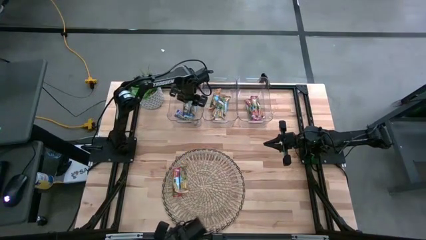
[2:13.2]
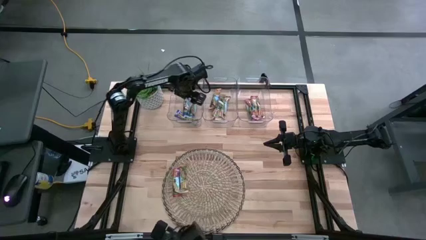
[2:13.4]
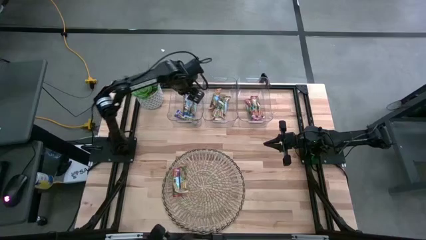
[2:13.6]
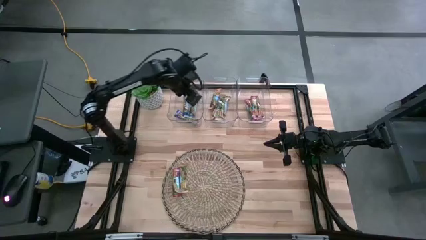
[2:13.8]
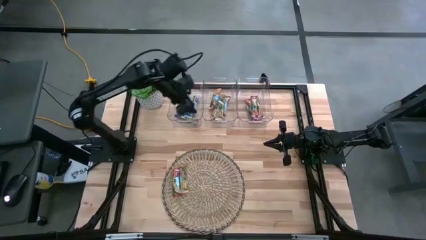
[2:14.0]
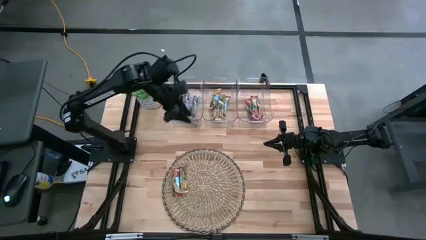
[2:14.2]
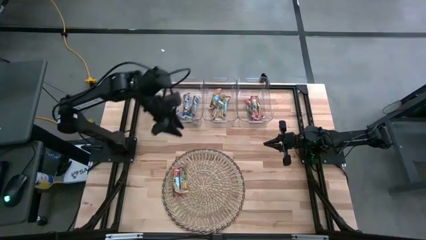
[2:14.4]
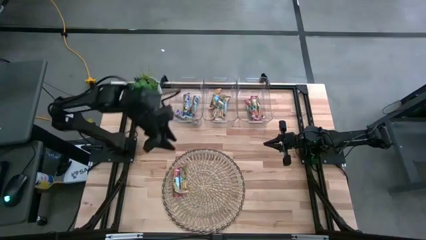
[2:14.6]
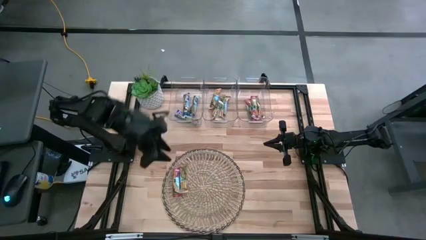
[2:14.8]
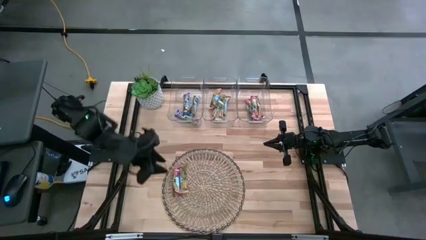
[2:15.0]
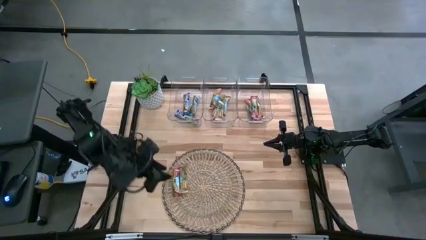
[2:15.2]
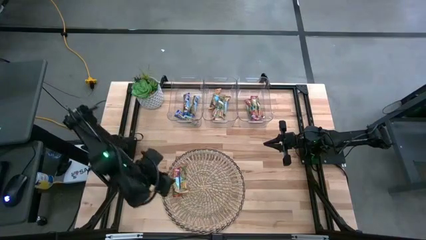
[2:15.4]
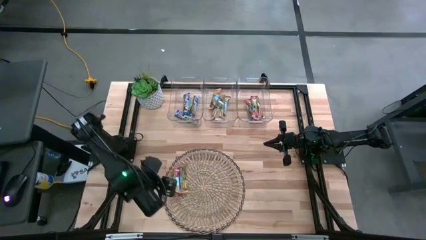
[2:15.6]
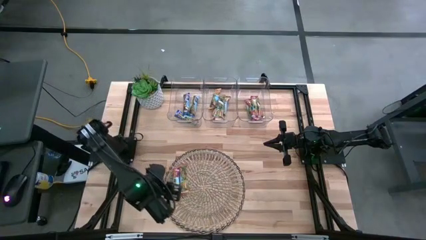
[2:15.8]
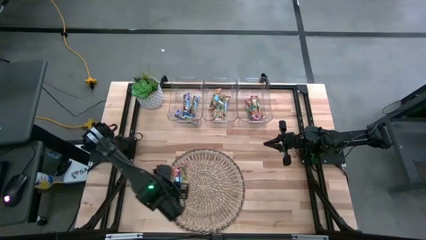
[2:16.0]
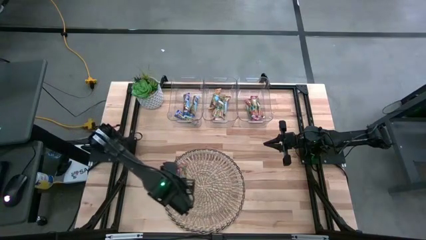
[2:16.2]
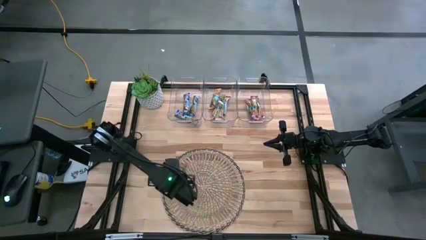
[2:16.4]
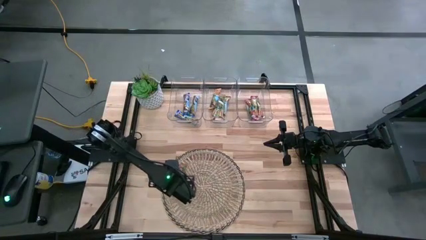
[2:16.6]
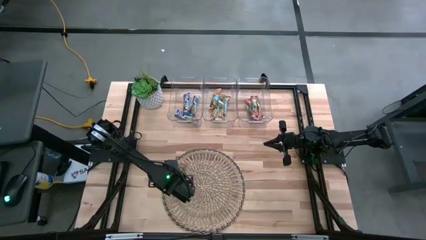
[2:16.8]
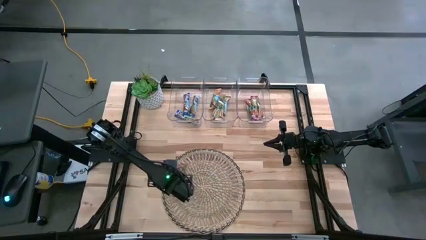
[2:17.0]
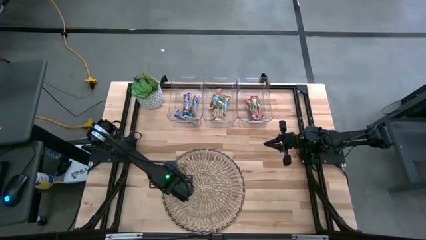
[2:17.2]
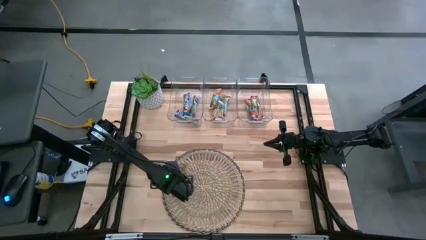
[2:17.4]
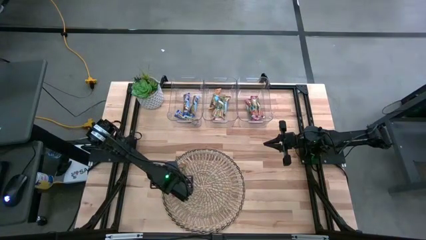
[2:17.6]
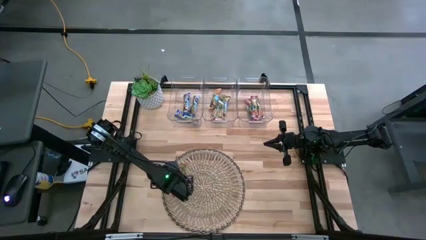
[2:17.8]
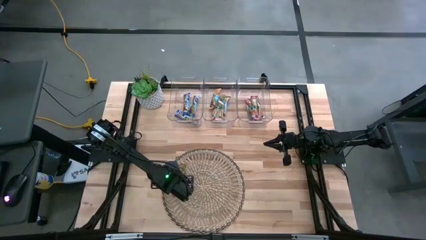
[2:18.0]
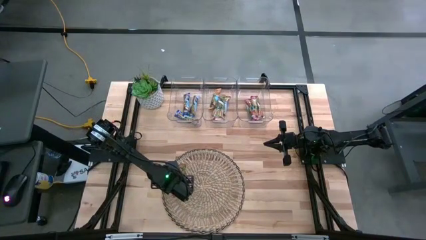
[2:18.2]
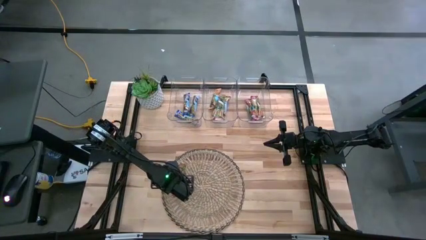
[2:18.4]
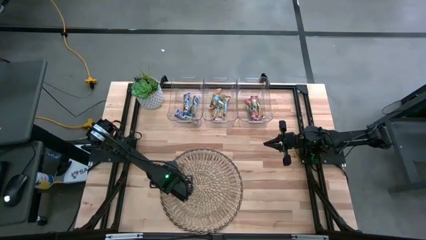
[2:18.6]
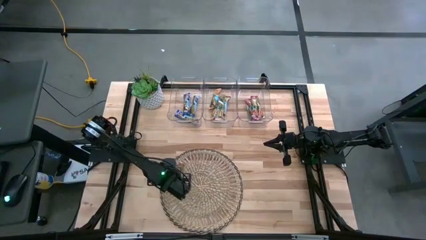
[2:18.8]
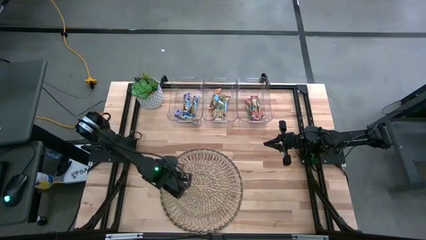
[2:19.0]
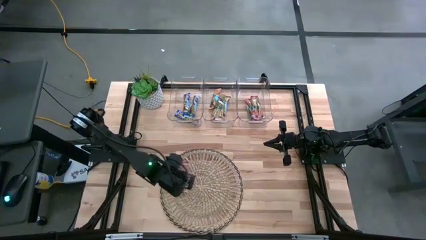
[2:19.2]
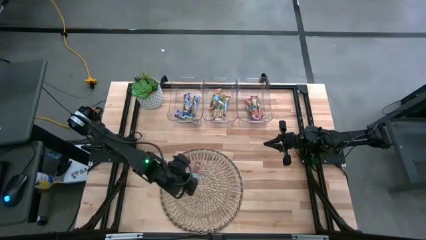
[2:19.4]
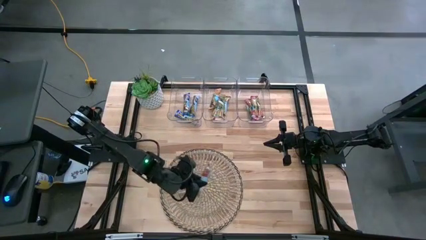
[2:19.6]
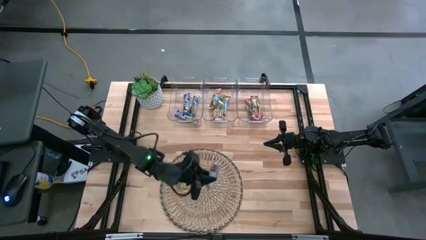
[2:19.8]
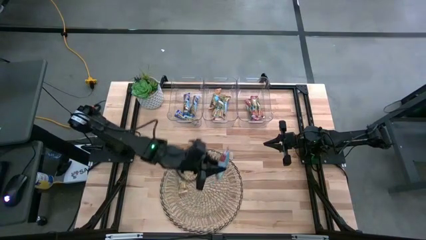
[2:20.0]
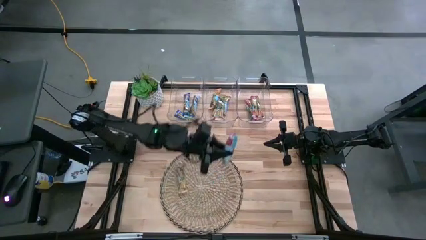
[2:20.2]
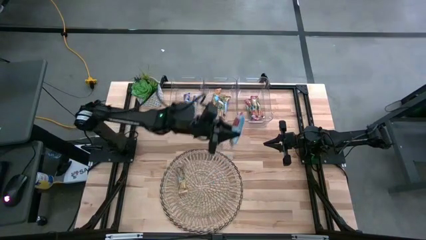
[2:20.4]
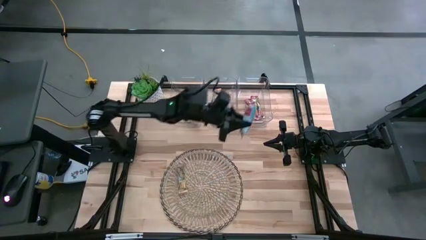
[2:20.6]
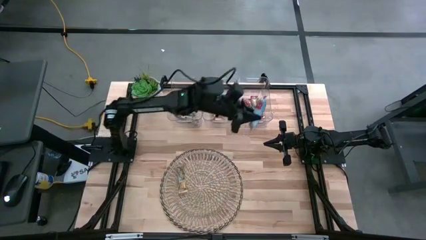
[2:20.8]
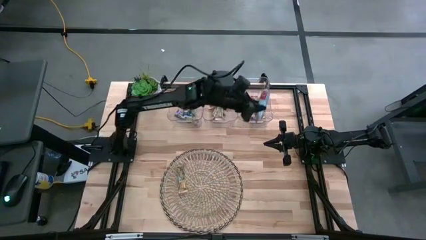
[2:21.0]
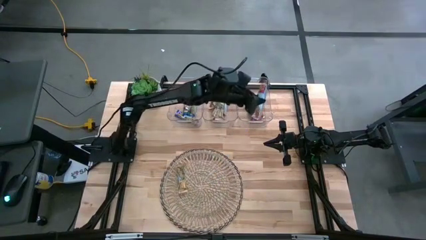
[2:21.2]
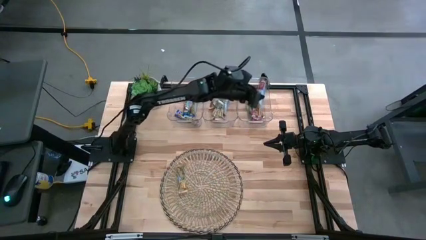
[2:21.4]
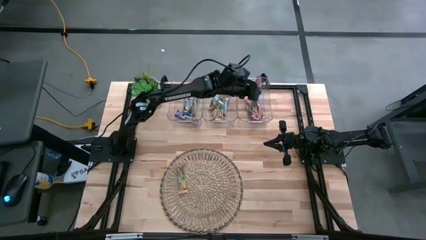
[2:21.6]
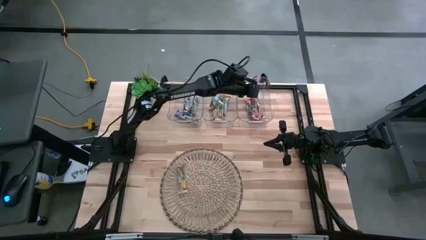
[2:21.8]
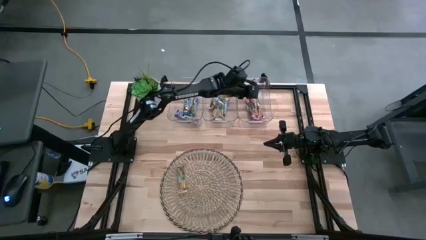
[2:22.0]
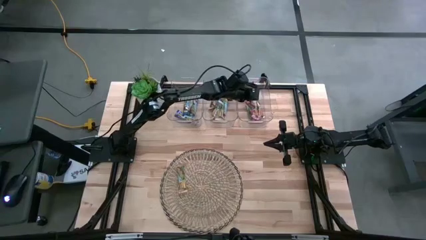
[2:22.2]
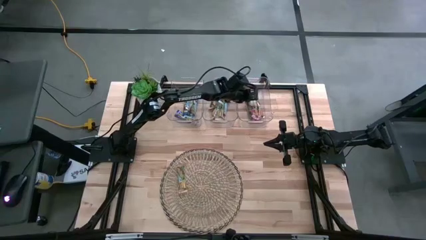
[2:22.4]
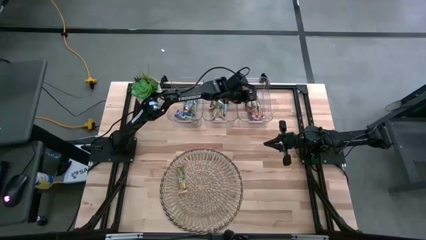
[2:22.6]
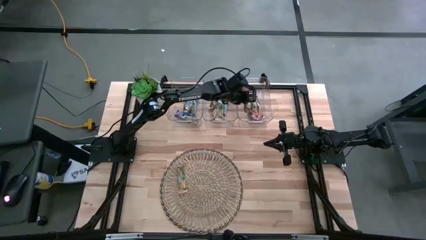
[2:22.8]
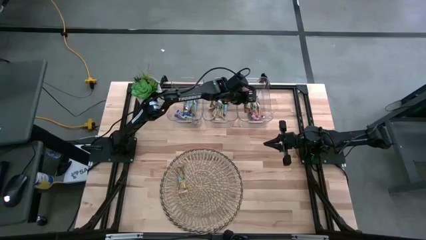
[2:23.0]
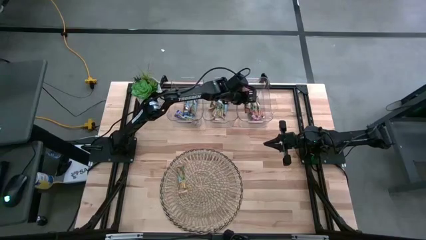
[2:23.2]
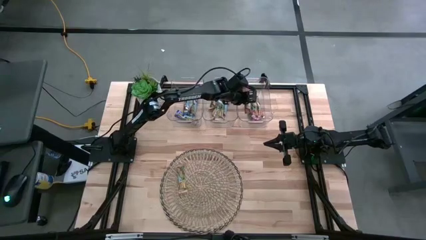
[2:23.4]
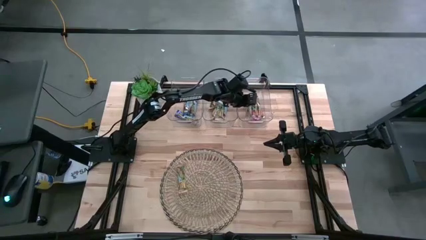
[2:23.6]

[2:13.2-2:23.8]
Task: Pick and place Granola Bars by type
Put the red granola bar into the right transparent bin

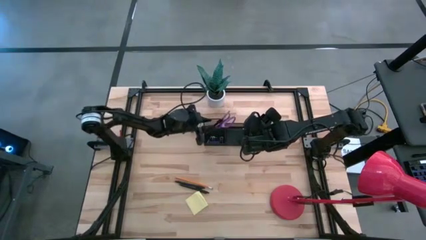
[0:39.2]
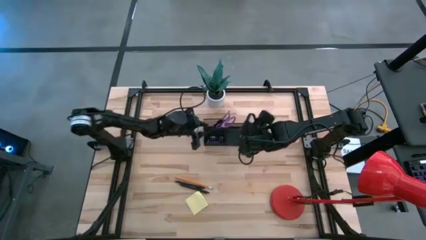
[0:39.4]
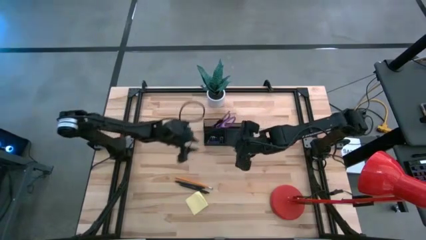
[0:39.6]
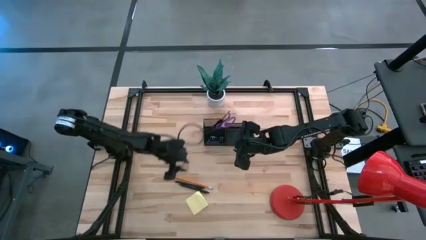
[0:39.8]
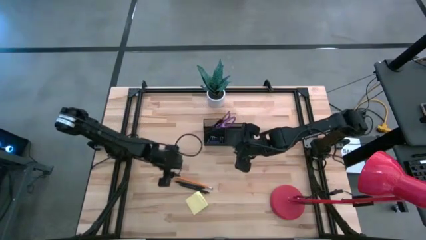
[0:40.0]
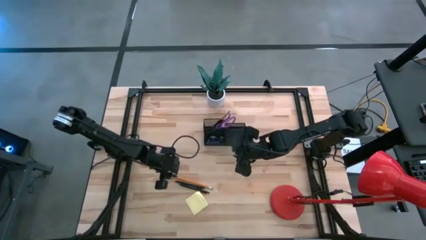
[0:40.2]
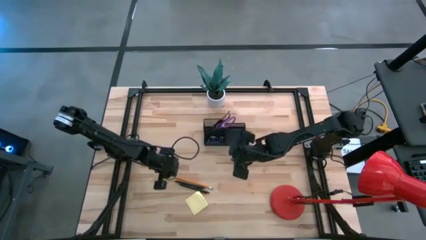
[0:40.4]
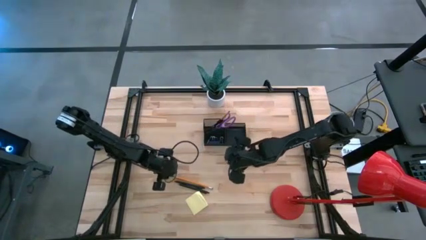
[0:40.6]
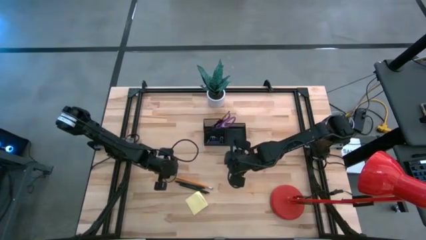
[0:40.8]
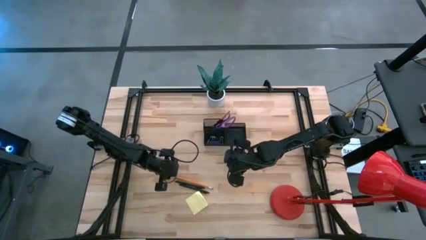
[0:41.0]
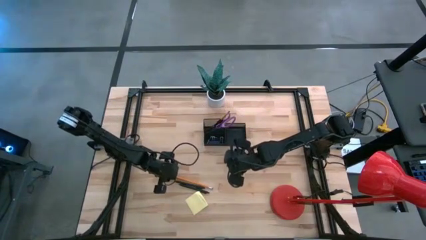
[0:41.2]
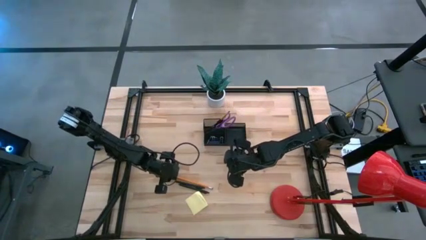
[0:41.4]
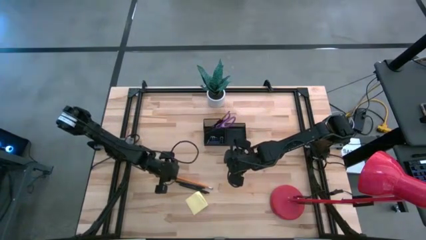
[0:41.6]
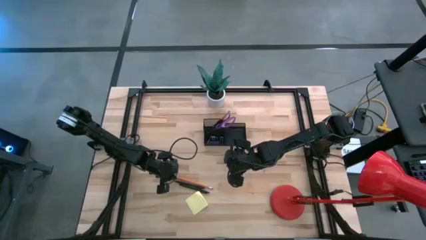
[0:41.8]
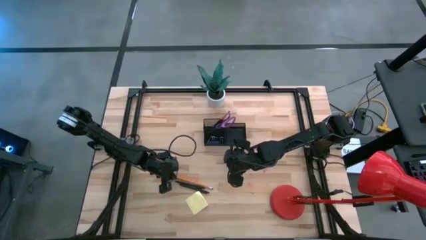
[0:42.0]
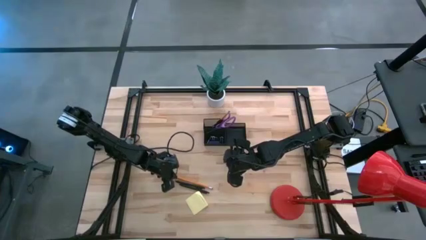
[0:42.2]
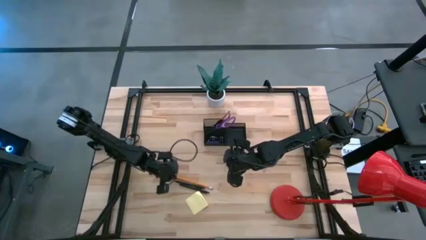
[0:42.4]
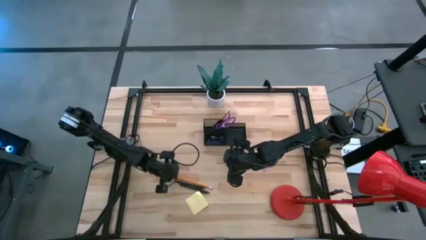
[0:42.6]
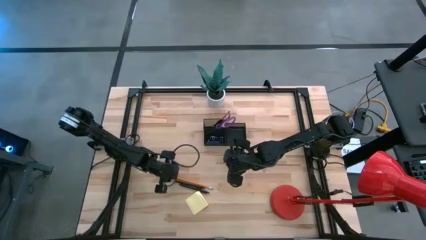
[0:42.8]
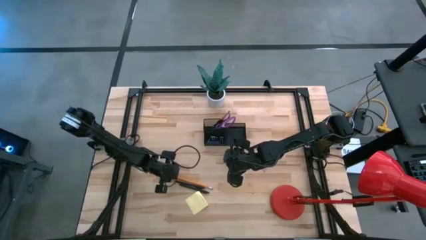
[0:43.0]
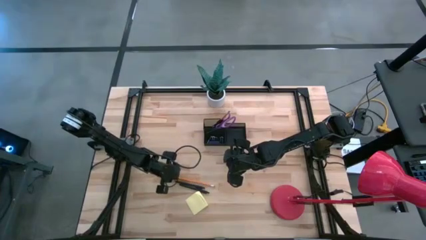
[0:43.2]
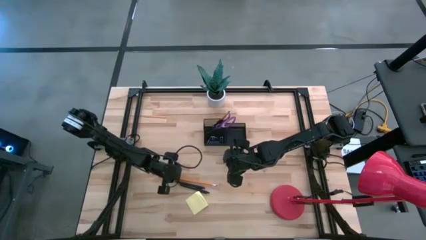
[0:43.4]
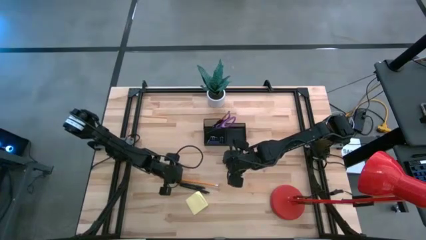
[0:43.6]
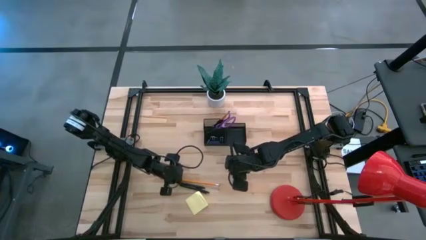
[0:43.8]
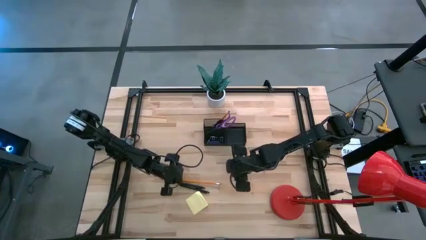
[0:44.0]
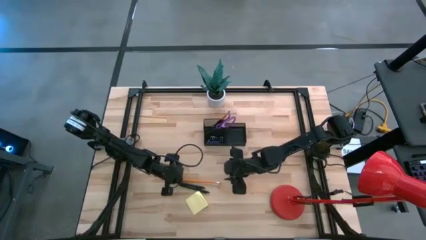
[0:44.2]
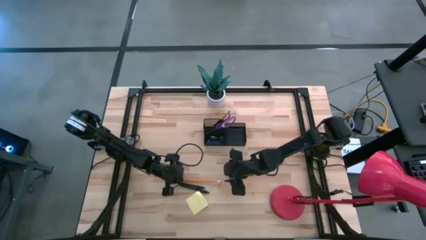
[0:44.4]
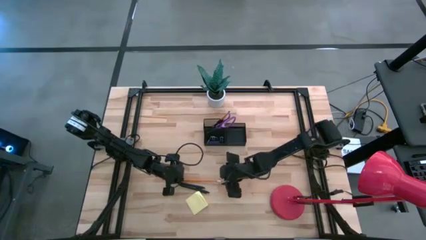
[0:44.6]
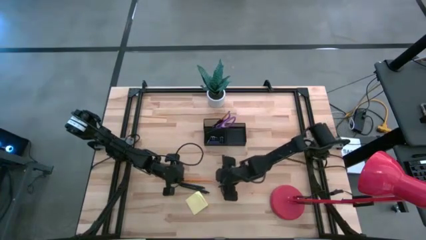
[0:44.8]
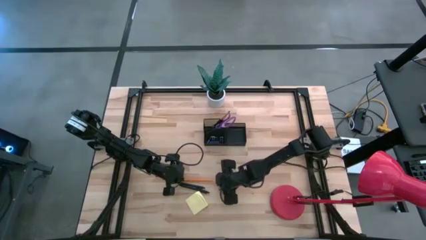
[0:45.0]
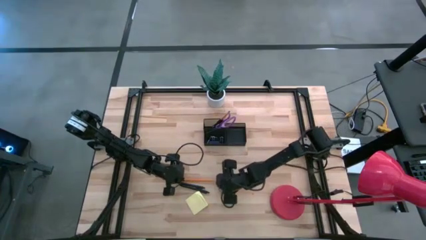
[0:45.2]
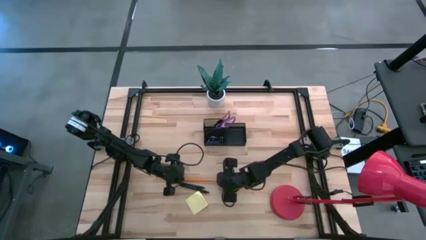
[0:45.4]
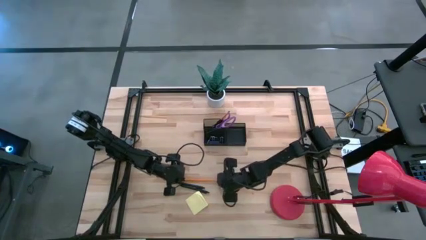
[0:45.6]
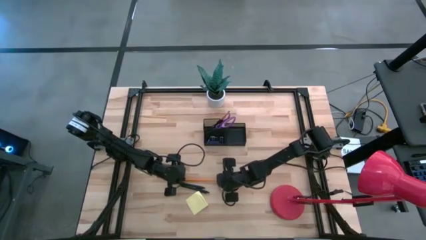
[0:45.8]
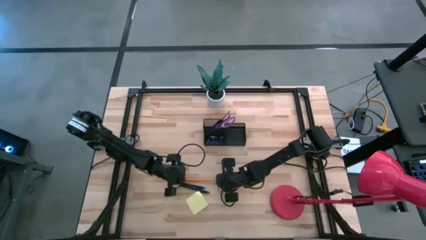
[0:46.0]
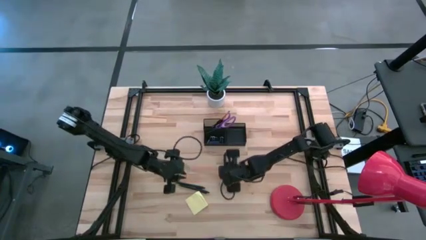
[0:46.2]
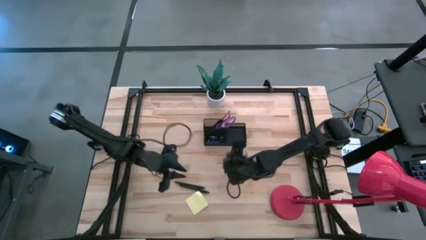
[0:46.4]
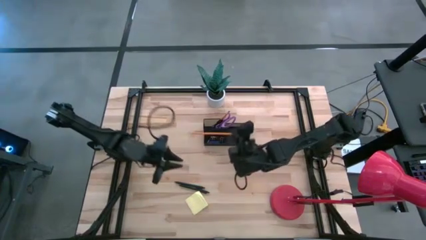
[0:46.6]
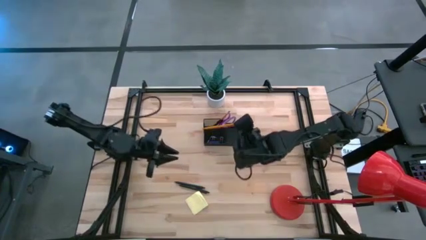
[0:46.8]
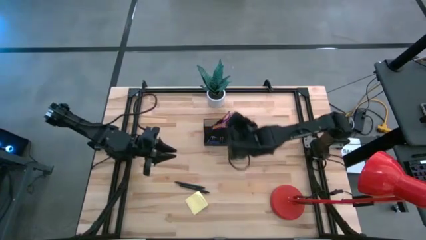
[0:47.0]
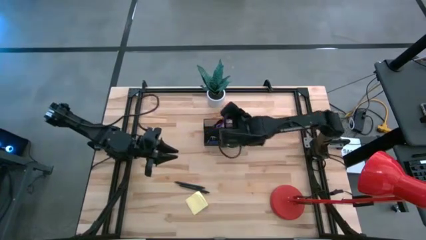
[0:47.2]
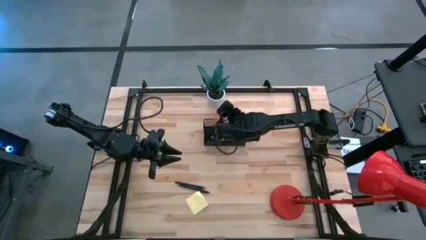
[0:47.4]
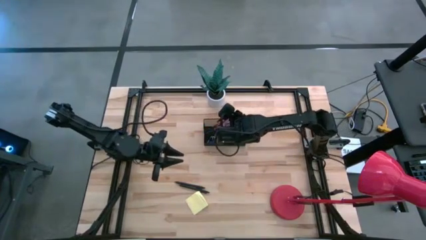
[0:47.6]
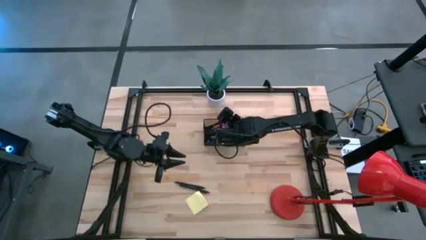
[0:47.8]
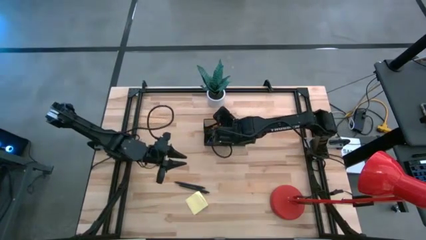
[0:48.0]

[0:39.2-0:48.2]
Task: Pick and place office supplies into organizer
Put the orange pencil into the black organizer
